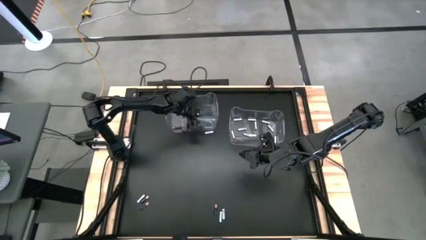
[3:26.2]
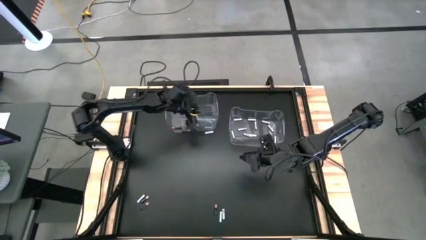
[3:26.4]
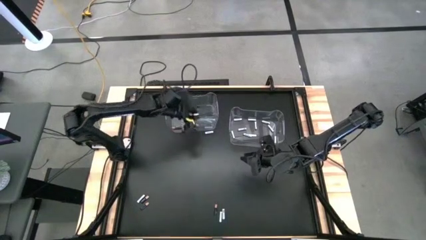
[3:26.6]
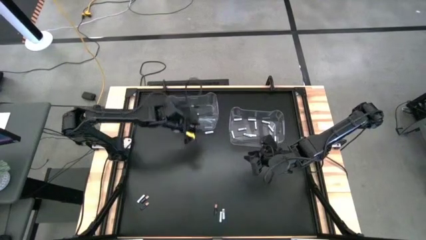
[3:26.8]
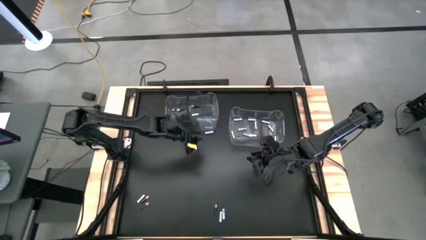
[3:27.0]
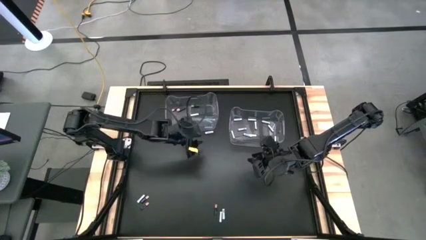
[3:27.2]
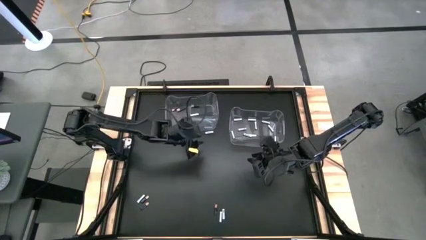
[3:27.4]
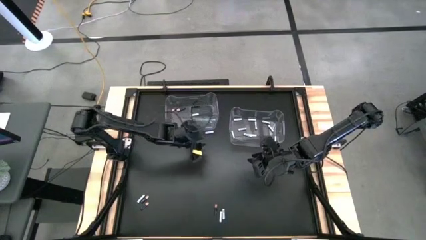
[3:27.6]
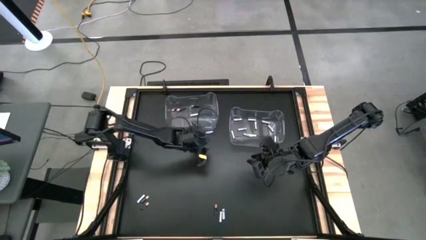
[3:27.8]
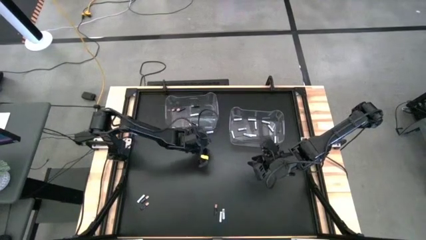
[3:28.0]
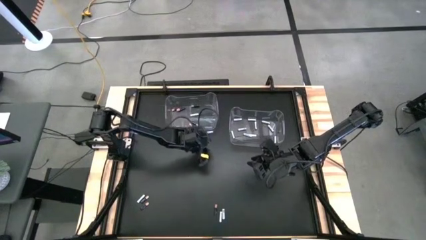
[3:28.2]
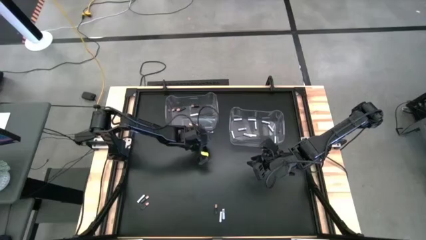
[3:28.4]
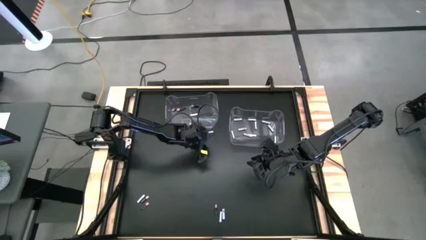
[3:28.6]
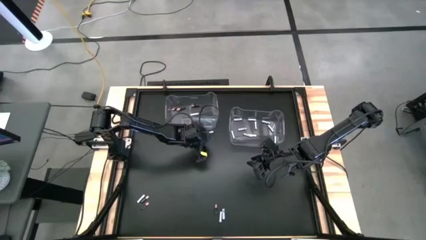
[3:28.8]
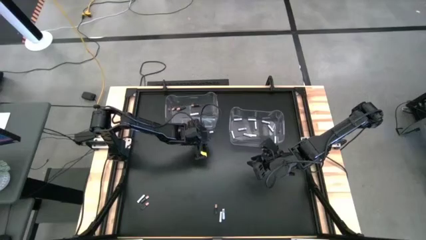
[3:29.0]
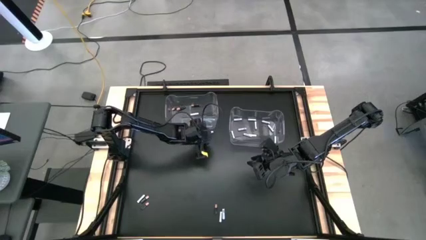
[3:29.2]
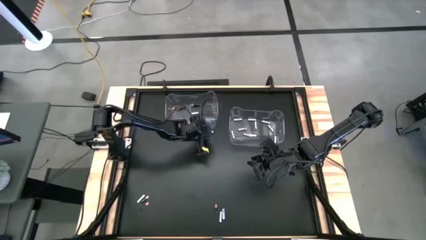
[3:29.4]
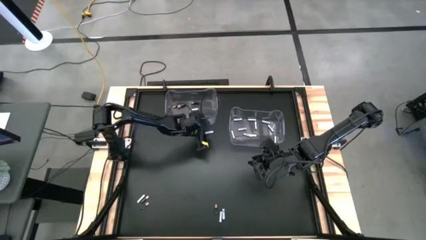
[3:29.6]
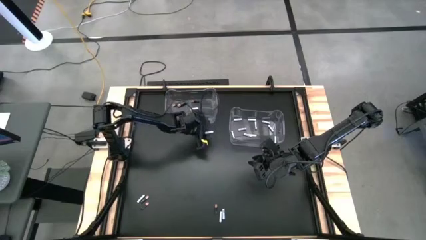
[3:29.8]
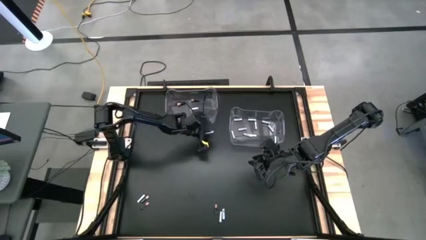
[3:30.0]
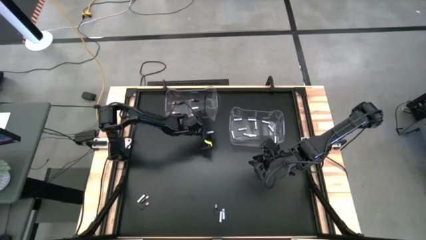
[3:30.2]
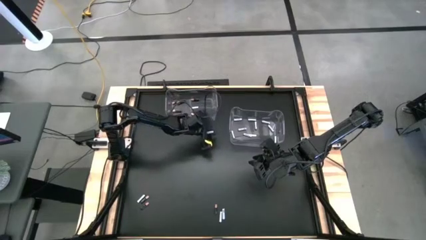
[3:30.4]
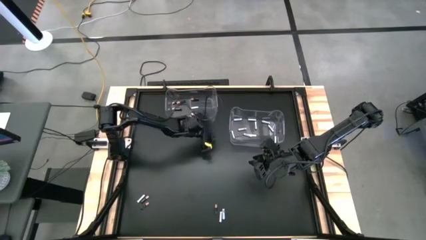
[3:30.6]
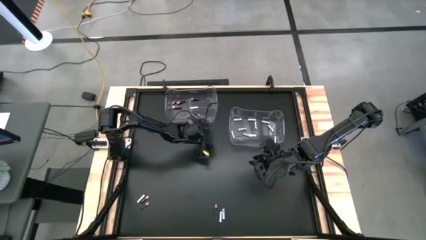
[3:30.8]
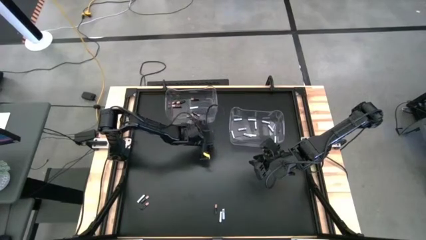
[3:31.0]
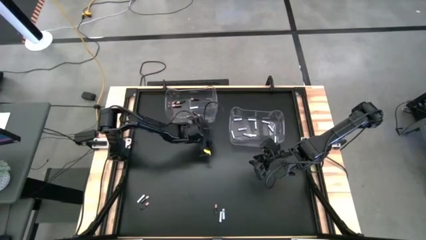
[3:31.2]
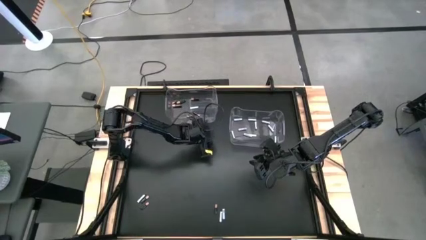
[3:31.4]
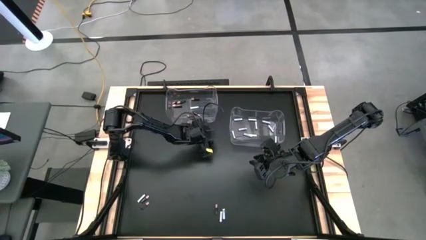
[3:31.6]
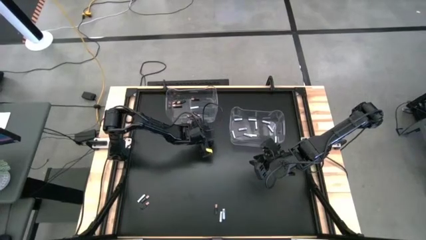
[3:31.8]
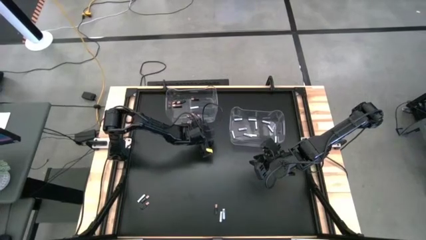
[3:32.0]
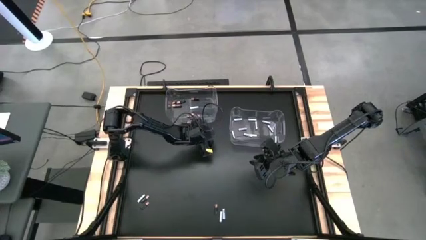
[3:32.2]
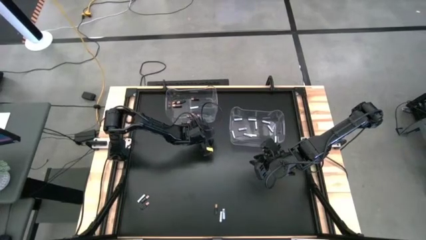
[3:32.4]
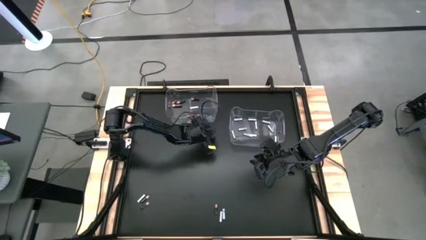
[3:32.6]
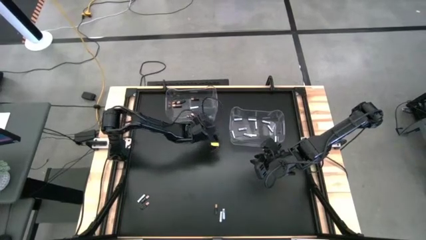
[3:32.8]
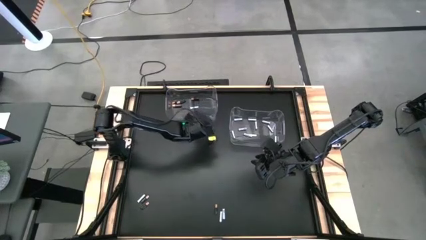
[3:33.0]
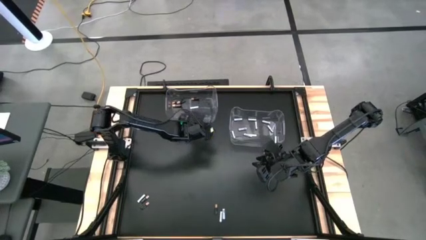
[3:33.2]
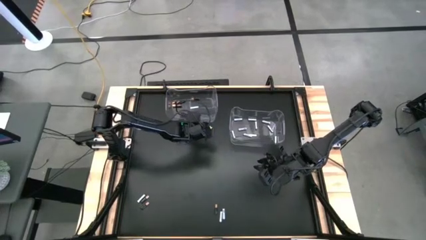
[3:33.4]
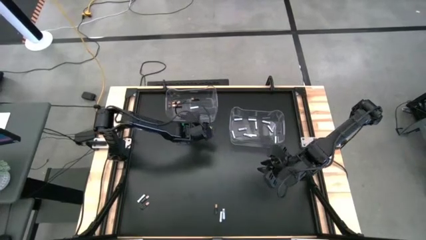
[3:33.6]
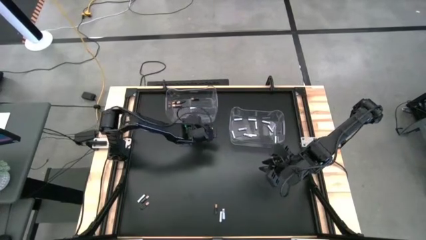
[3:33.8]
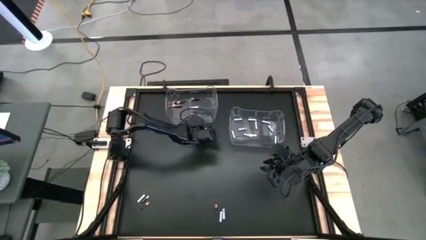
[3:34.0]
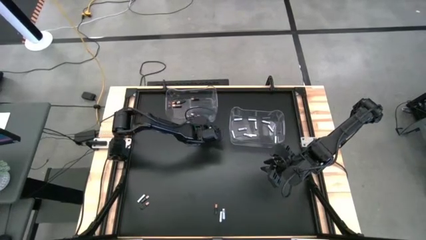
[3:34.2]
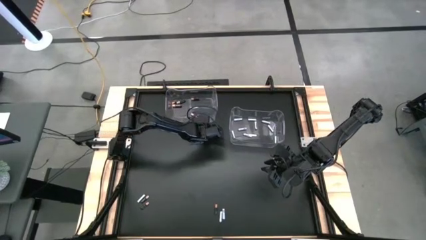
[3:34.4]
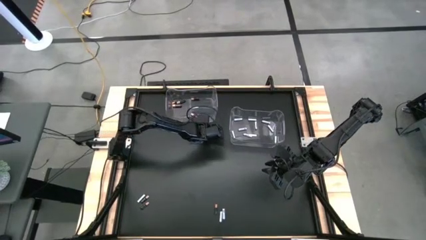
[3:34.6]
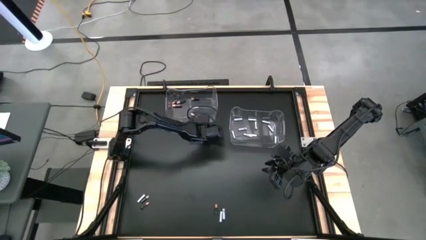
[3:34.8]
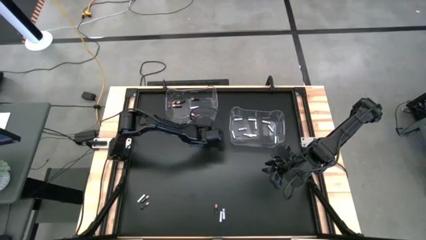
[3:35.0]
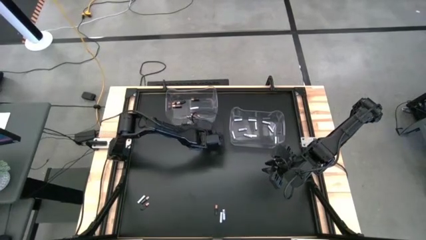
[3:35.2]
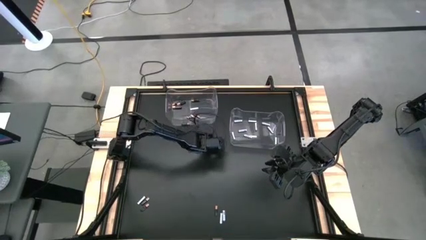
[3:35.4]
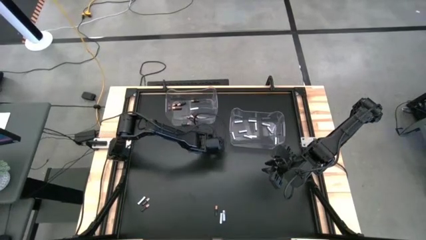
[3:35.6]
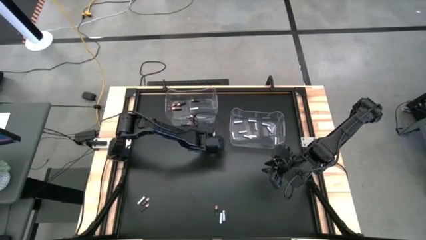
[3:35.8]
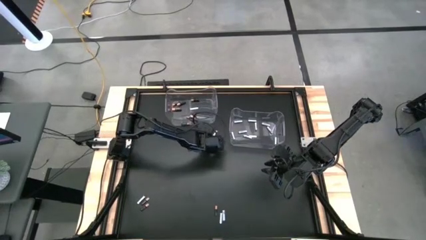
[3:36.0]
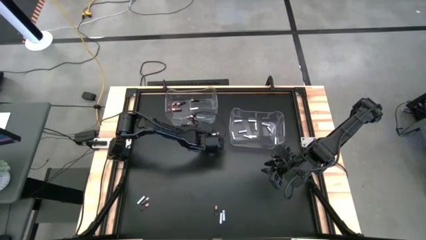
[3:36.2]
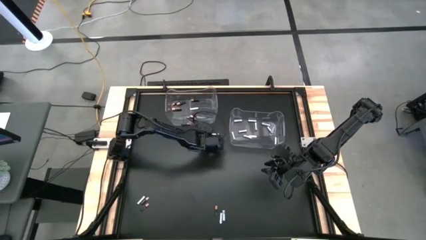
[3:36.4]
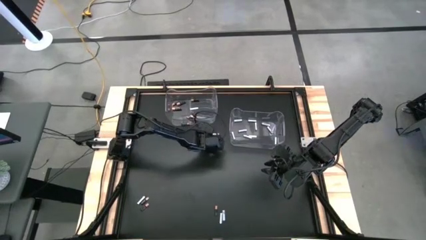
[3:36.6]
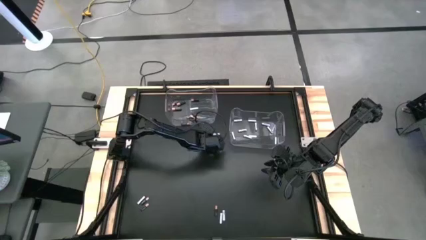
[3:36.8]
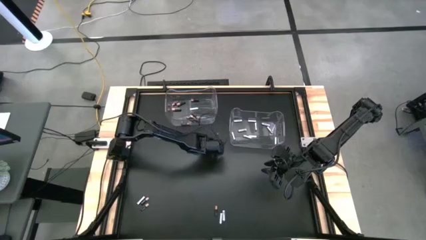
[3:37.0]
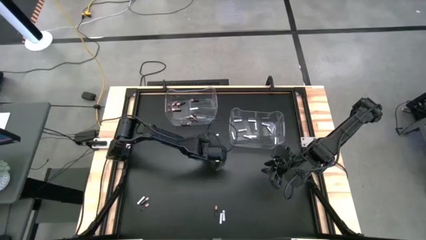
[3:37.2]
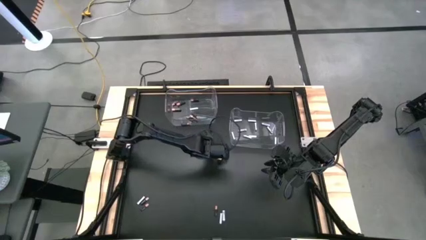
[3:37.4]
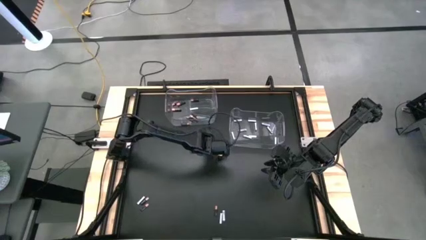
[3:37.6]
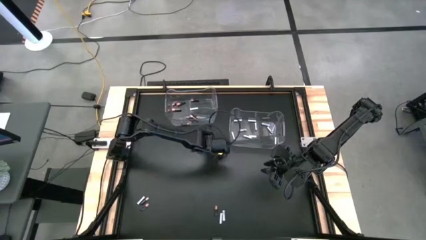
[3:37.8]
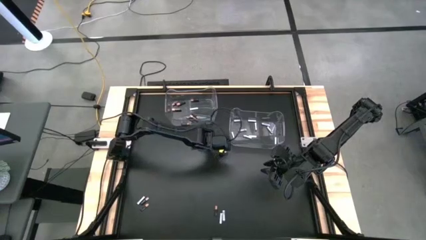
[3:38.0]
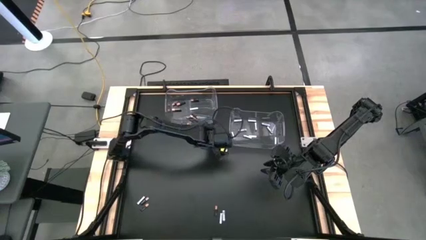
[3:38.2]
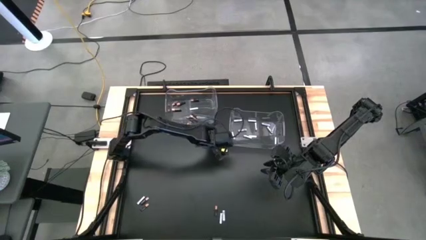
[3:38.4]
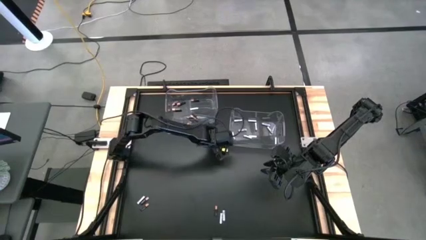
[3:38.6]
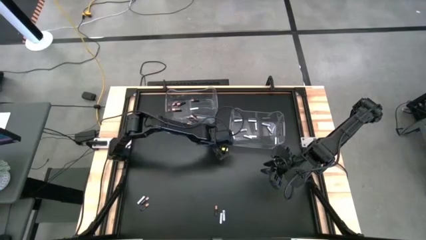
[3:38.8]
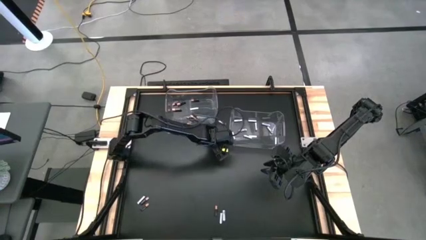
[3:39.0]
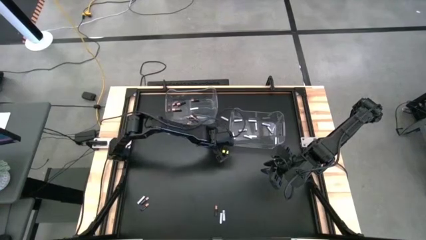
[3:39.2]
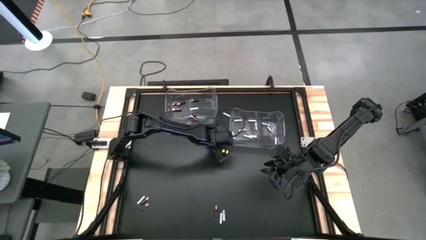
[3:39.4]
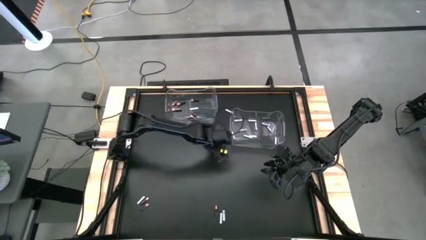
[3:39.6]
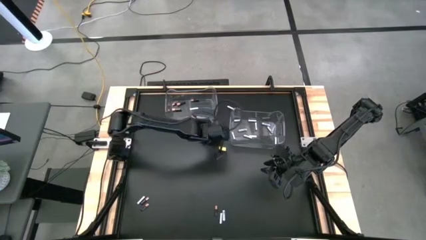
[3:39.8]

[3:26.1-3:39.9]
Task: Sort batteries
Put the white battery into the right transparent bin

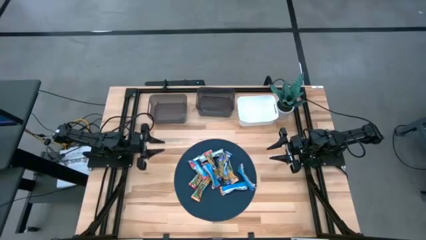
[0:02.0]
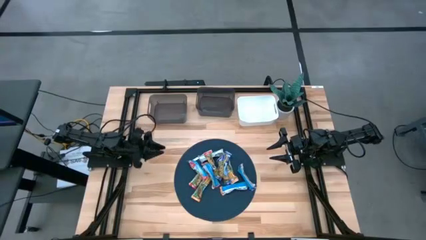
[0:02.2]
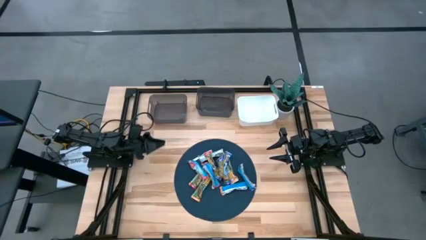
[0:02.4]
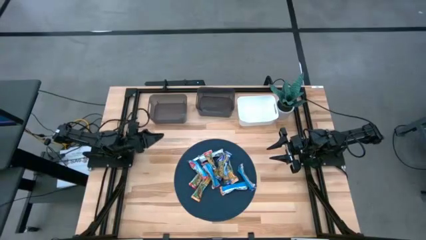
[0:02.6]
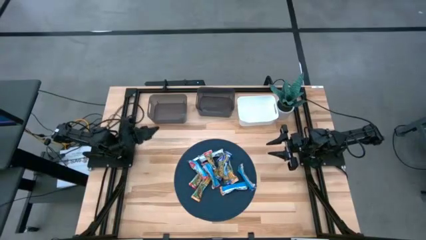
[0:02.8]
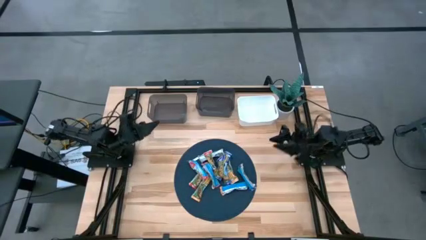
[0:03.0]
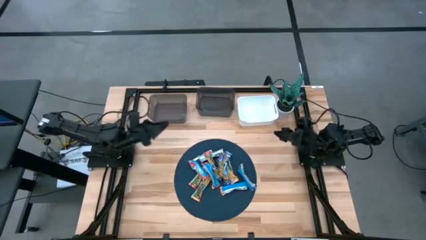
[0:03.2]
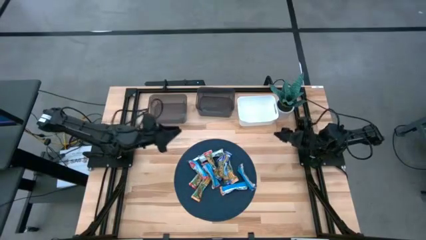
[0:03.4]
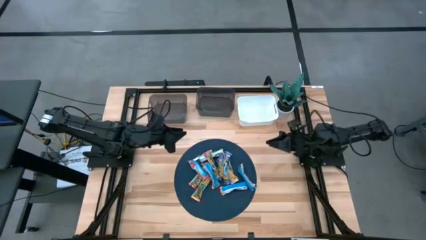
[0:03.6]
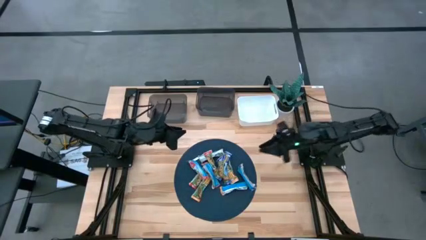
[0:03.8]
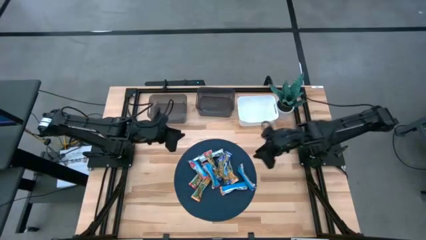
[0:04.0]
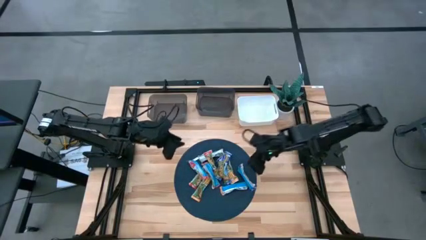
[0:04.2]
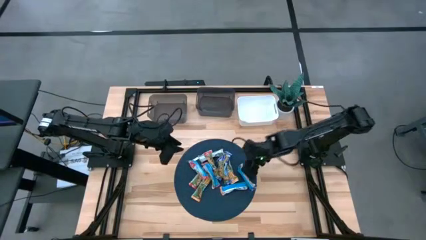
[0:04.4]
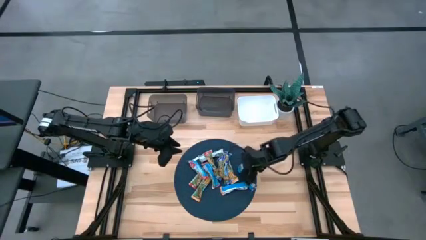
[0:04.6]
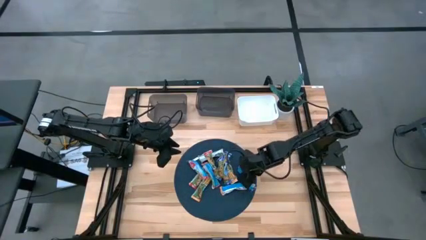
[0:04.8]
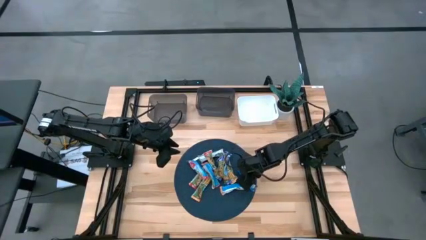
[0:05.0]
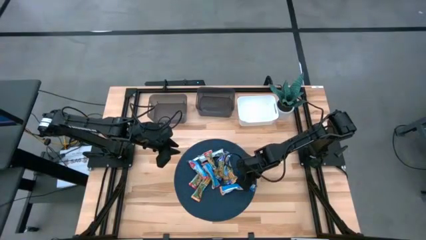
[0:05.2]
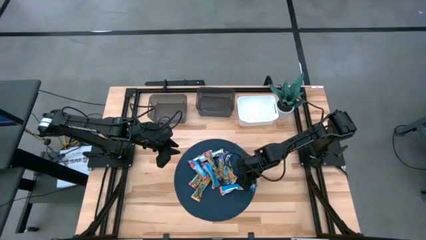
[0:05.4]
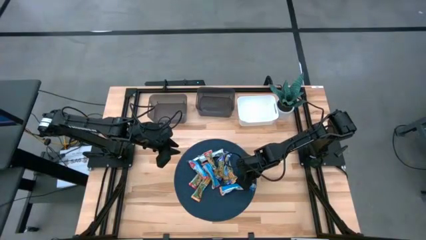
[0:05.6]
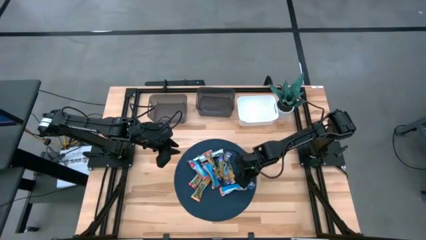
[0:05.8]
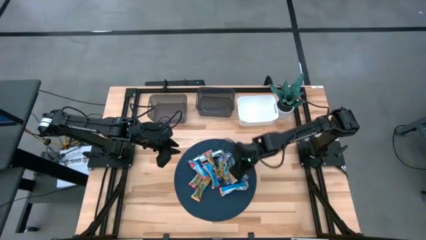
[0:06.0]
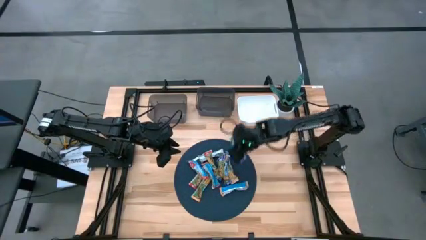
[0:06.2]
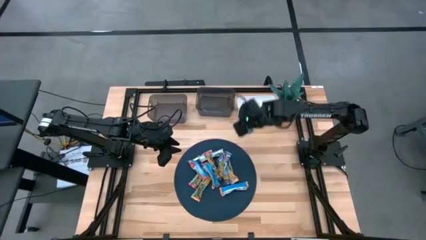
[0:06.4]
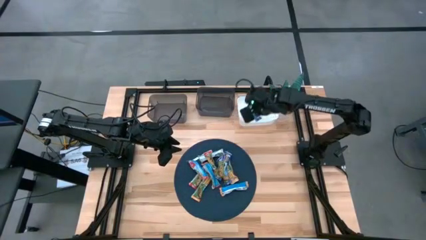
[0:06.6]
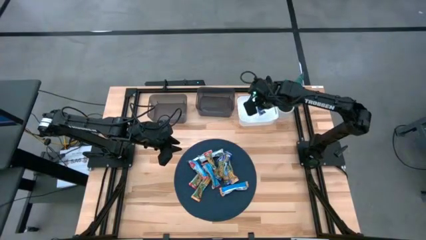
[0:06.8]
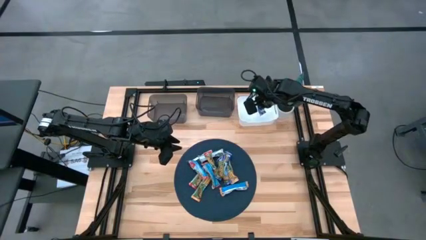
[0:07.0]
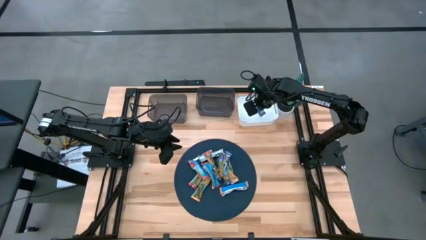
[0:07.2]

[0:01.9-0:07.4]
Task: Pick and place Granola Bars by type
Put the blue granola bar into the white bin
